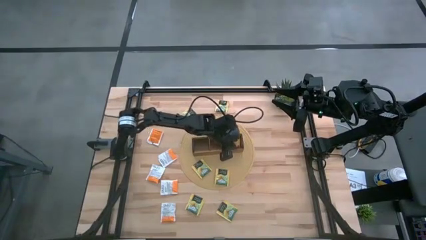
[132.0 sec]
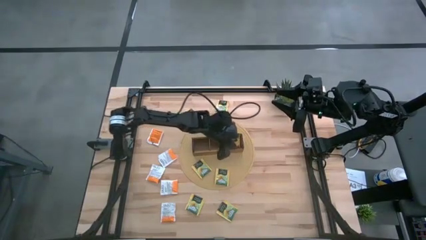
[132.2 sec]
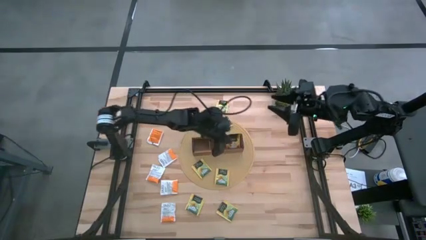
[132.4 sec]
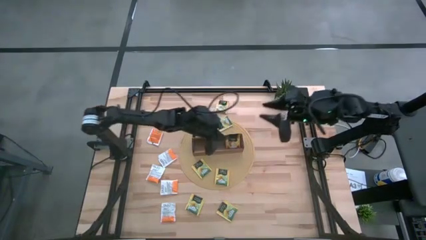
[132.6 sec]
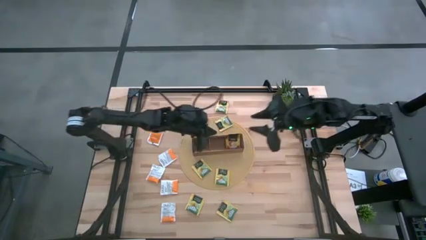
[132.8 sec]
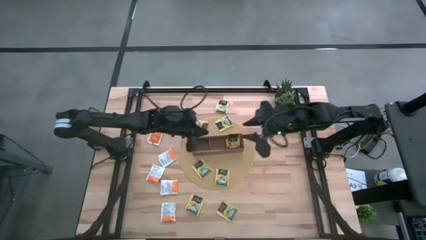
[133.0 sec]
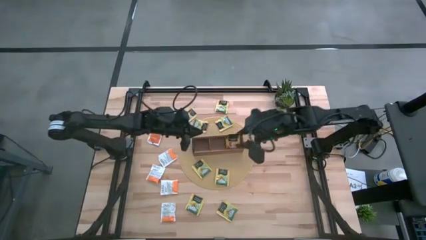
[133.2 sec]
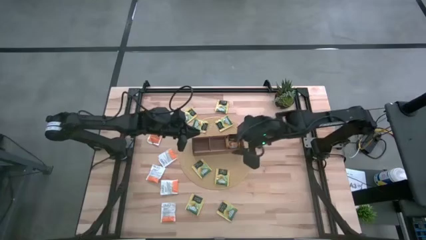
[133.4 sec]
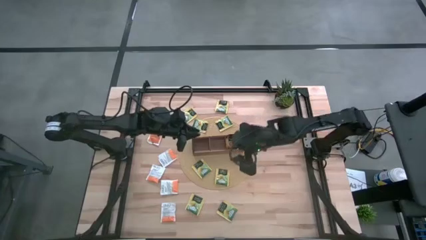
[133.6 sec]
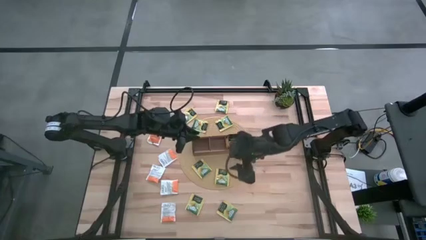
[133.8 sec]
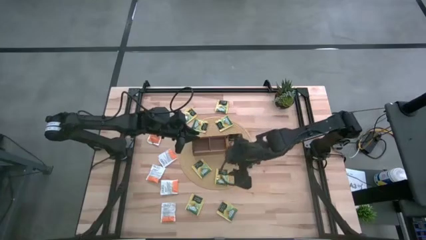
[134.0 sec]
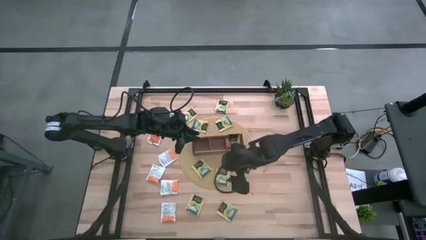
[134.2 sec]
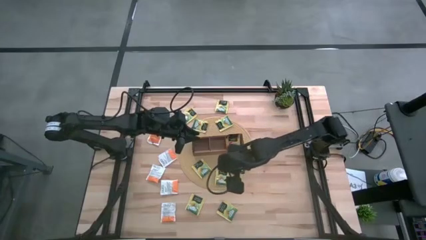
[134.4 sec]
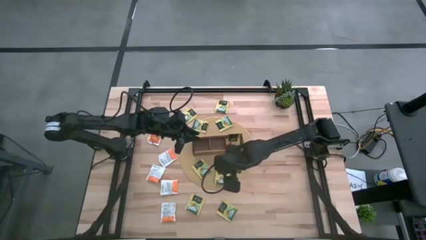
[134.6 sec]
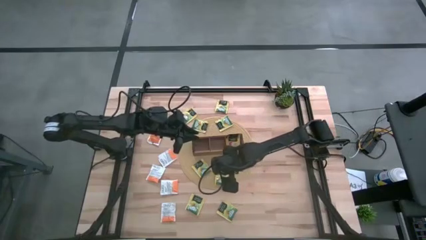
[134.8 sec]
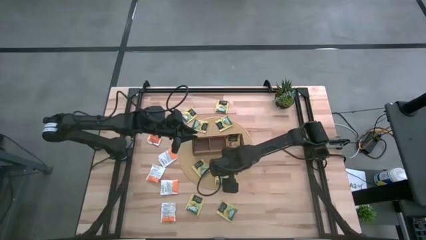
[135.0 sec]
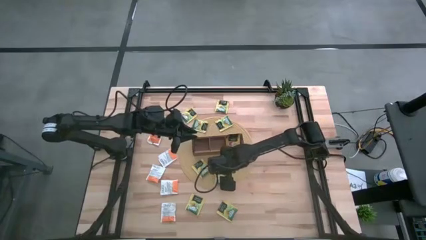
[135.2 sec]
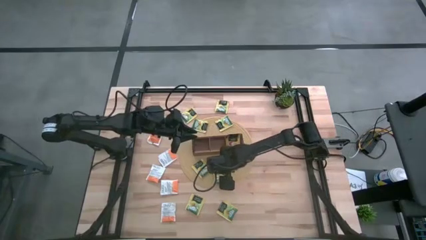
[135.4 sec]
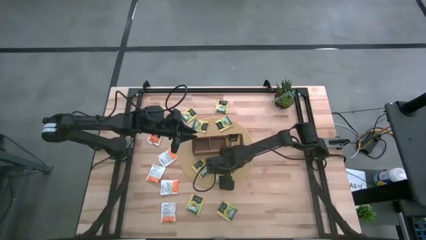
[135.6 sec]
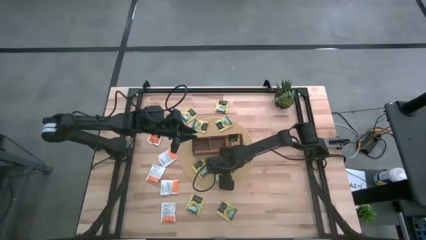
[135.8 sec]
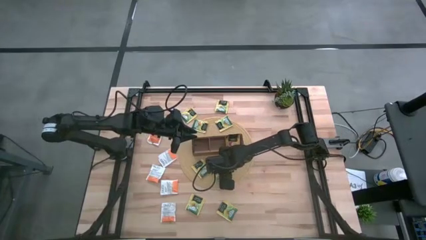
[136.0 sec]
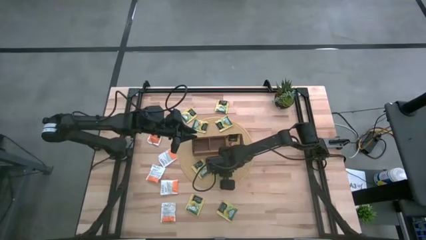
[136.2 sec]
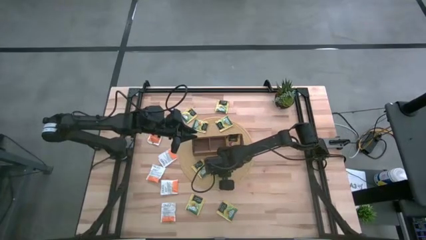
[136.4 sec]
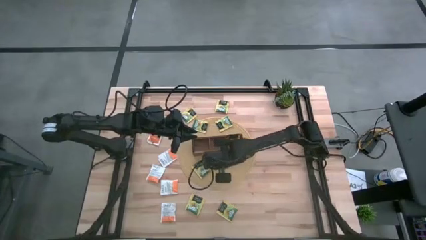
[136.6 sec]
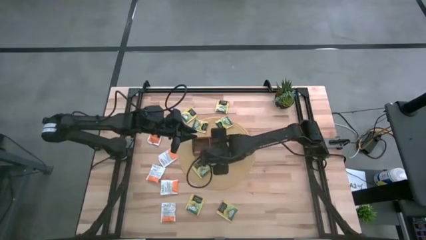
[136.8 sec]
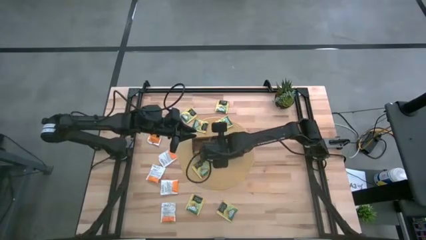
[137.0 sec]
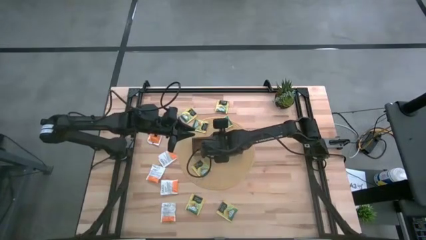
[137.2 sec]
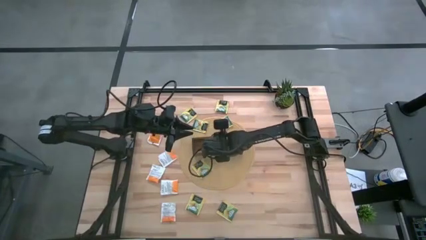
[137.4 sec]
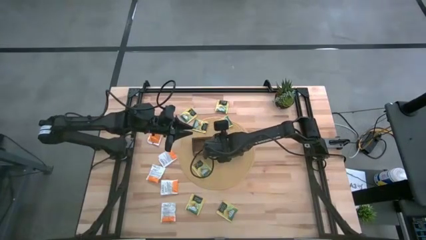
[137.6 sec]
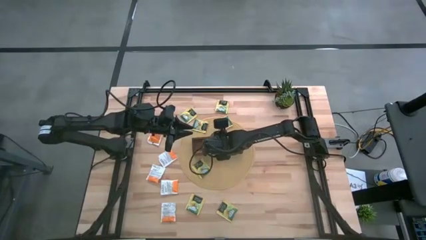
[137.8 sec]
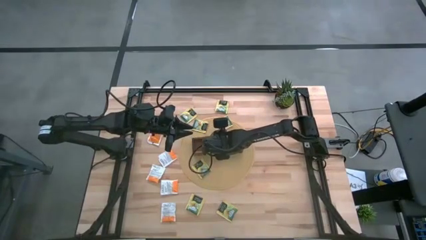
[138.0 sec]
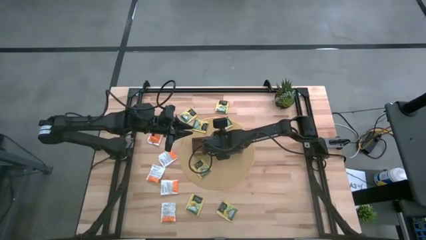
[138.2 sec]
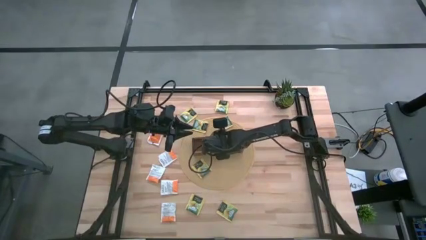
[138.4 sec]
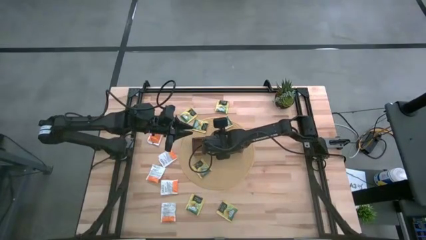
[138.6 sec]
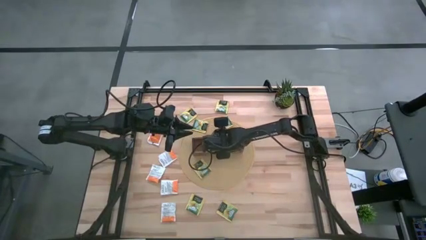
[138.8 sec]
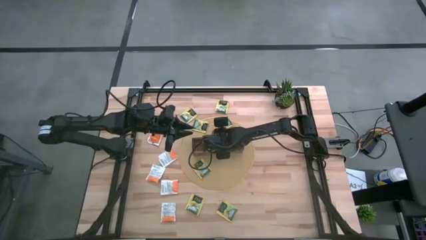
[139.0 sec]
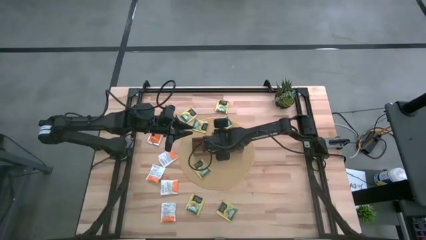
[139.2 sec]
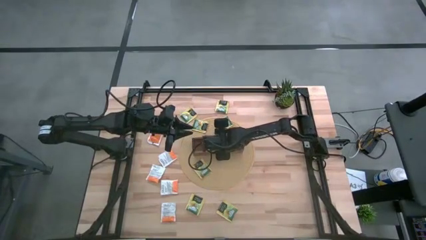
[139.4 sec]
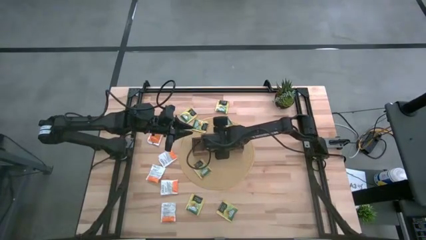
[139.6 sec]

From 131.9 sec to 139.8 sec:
Task: Pick & Place Tea
Put the yellow tea bag into the middle section of the wooden organizer

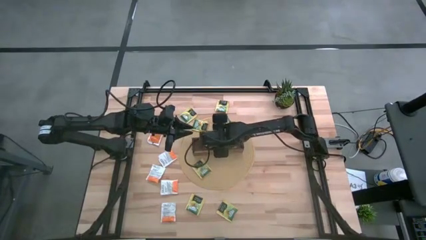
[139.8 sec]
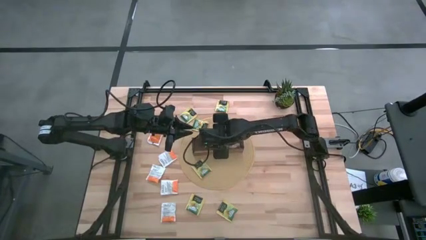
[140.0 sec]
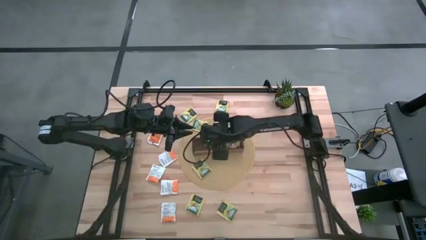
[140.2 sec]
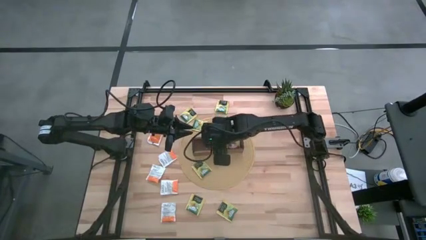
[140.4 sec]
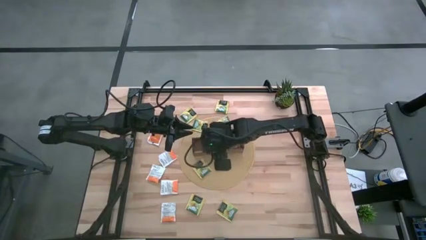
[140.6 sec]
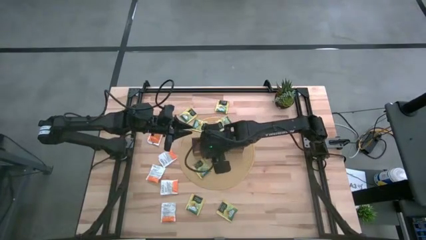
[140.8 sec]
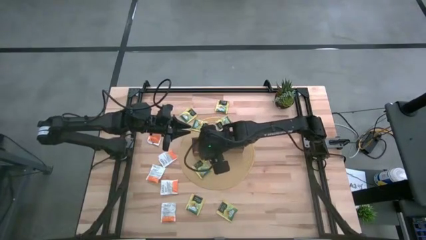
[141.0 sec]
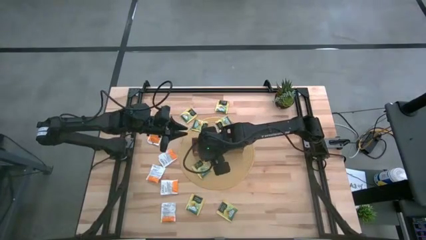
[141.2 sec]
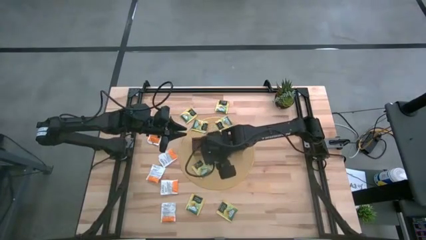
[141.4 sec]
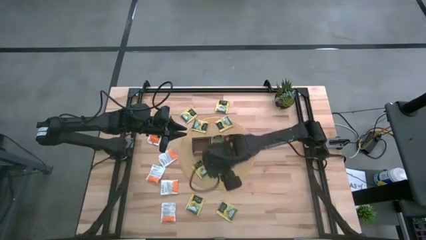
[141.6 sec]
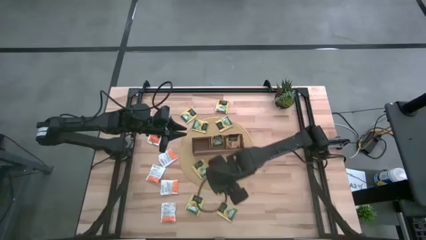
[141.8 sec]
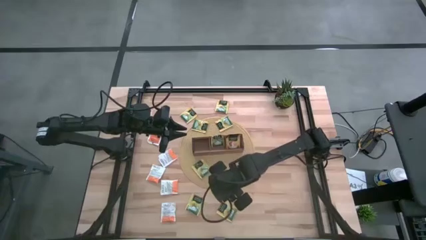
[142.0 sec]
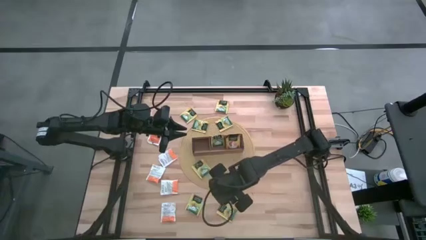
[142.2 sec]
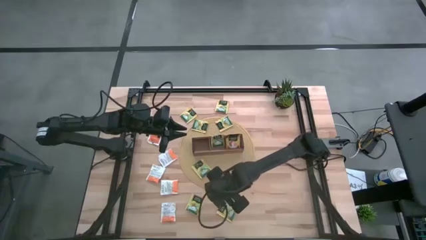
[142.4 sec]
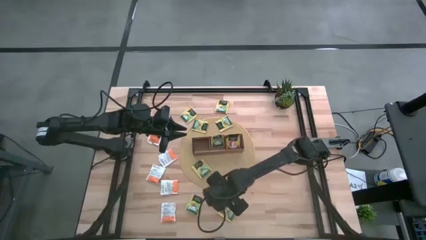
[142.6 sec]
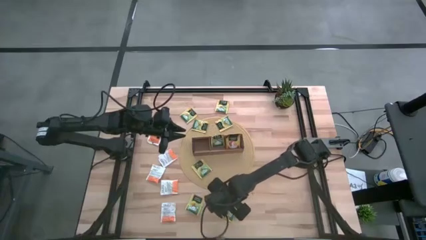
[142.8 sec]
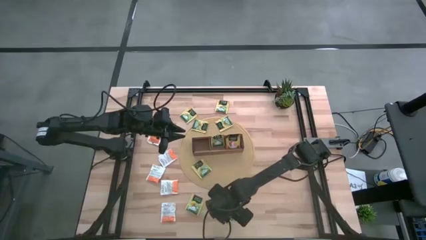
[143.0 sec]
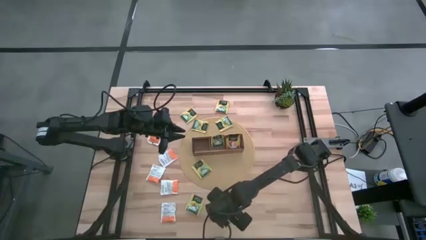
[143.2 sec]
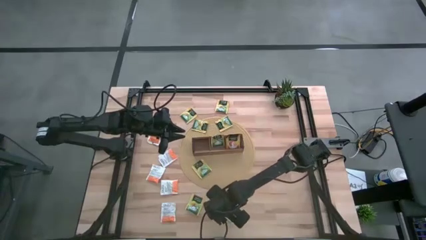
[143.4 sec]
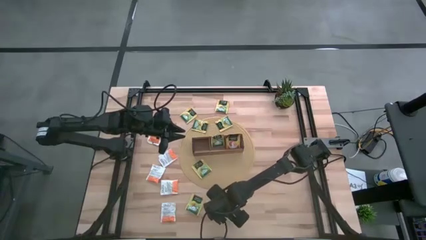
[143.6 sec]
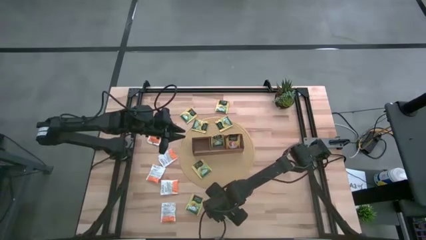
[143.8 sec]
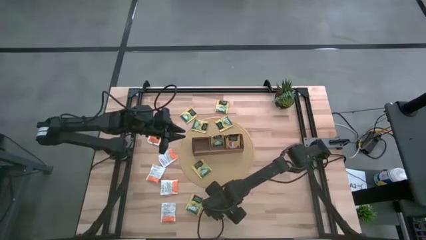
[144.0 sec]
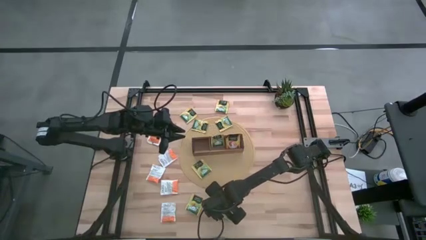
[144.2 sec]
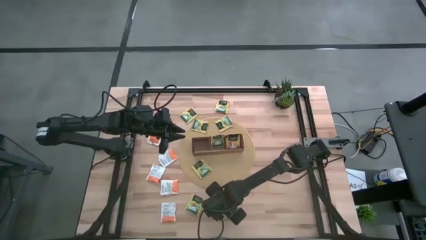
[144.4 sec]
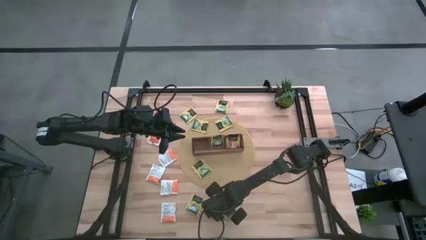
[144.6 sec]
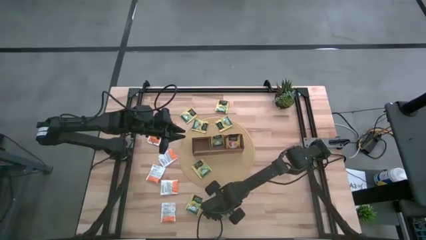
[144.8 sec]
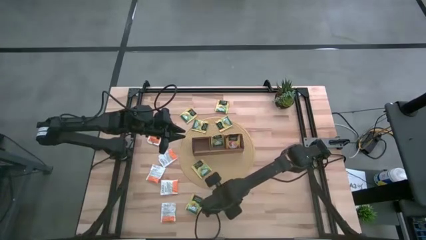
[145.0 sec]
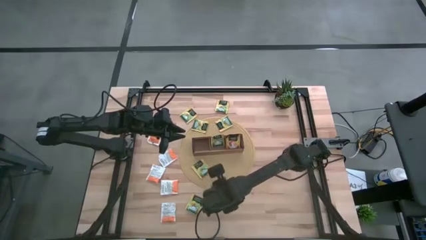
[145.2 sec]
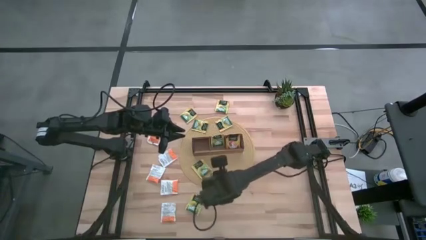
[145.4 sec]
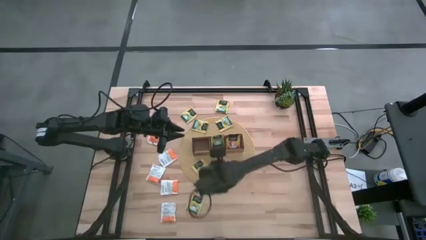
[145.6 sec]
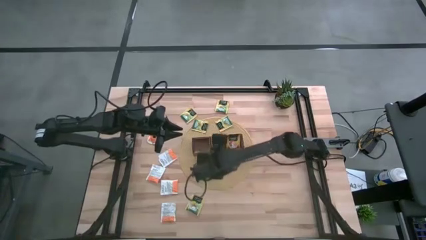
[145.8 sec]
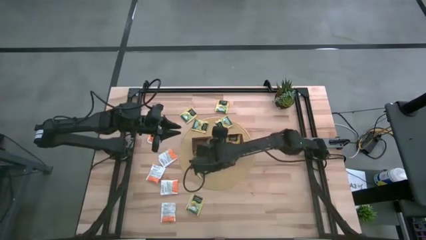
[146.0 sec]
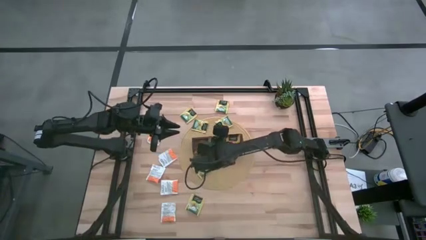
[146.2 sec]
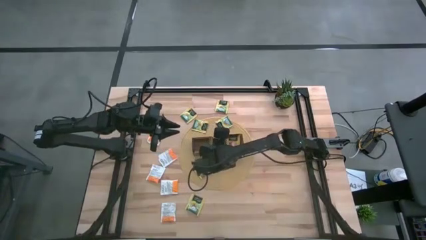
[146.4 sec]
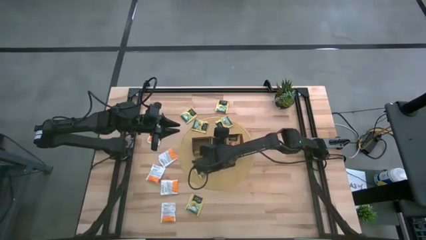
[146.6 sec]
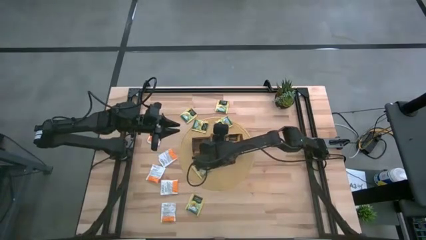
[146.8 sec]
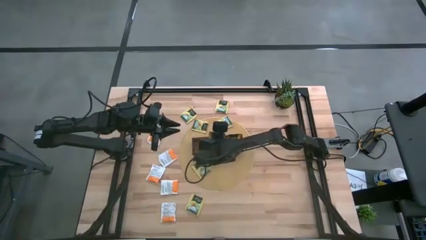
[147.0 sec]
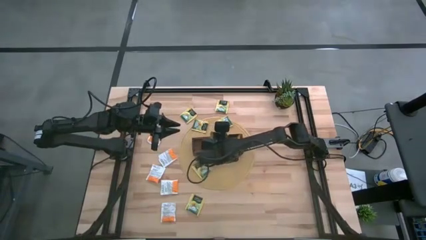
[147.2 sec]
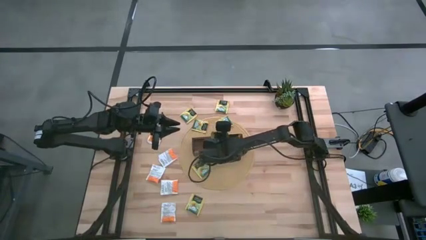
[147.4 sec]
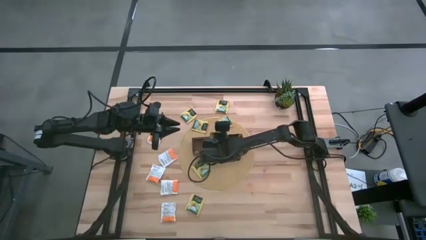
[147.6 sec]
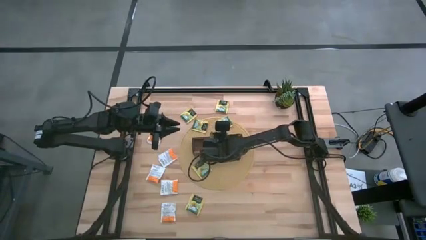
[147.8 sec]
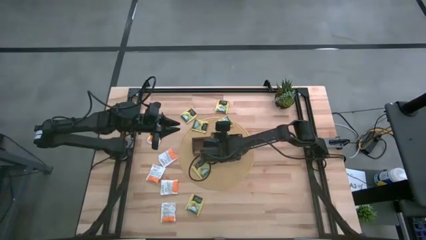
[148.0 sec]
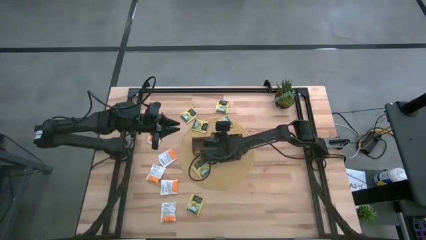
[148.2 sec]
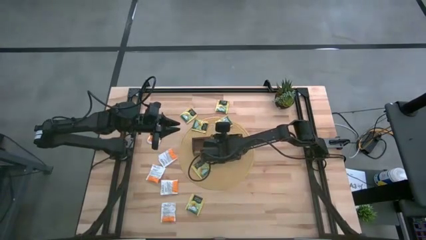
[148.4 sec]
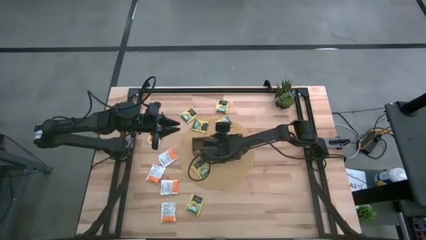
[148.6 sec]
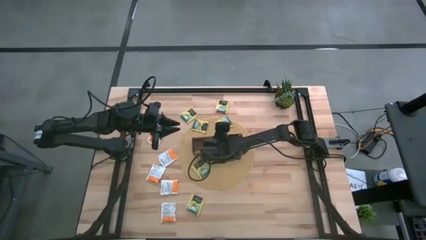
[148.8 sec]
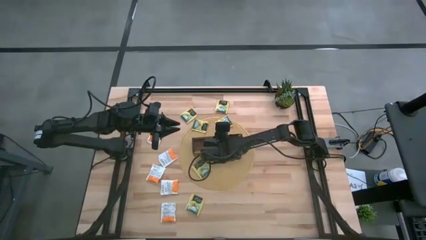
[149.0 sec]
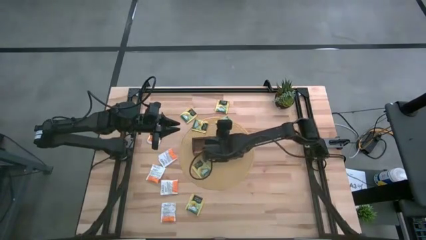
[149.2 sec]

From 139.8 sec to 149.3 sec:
Put the yellow tea bag into the middle section of the wooden organizer
